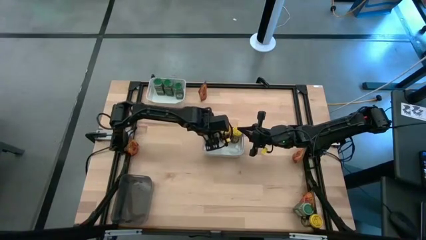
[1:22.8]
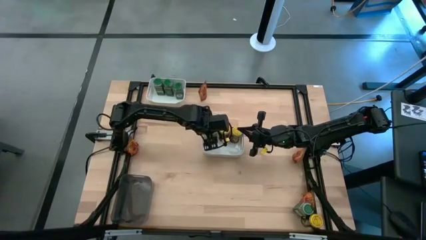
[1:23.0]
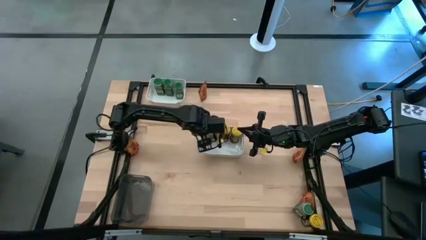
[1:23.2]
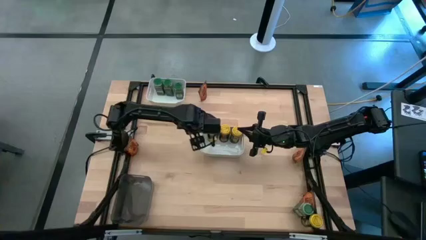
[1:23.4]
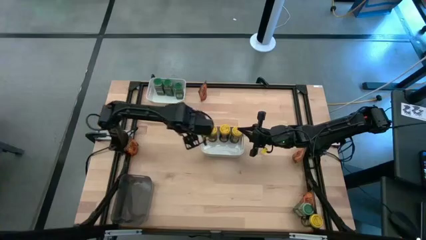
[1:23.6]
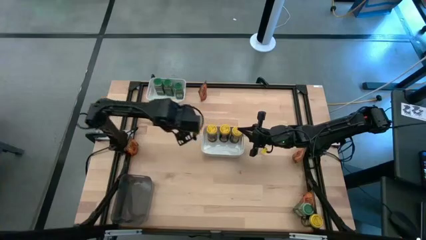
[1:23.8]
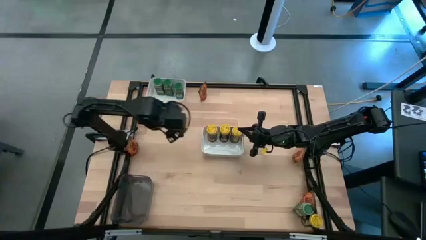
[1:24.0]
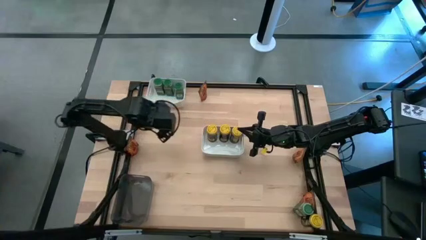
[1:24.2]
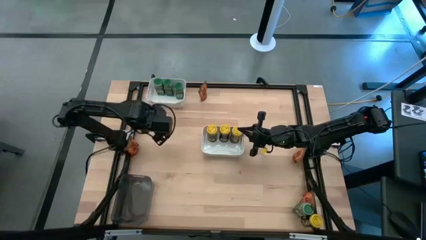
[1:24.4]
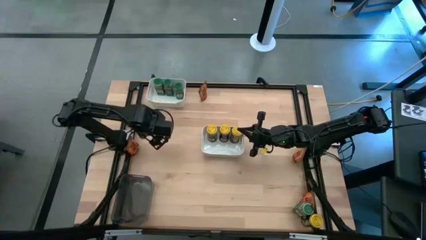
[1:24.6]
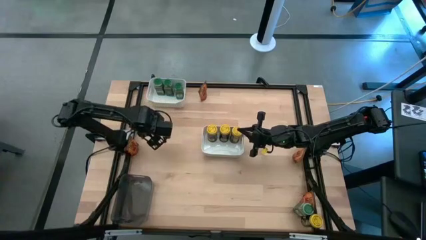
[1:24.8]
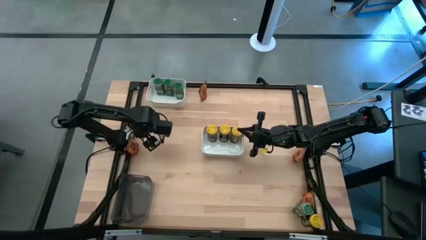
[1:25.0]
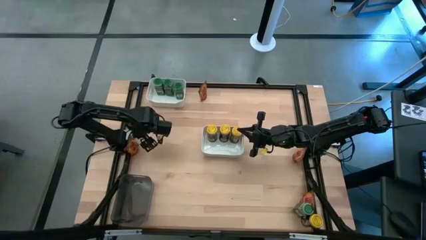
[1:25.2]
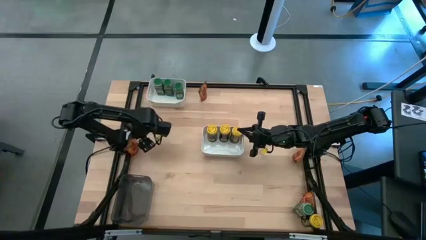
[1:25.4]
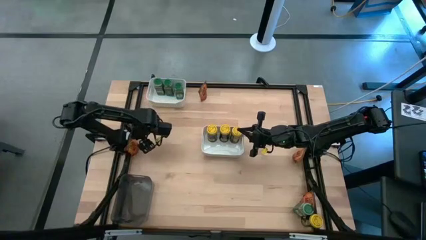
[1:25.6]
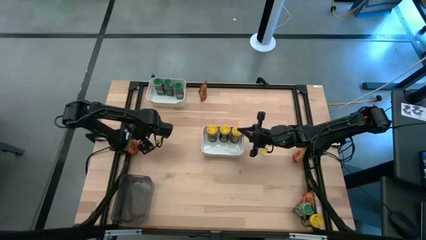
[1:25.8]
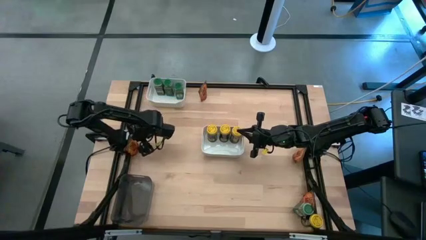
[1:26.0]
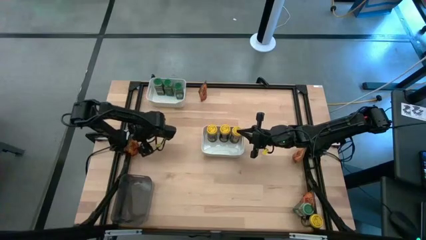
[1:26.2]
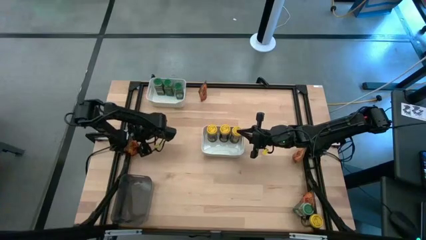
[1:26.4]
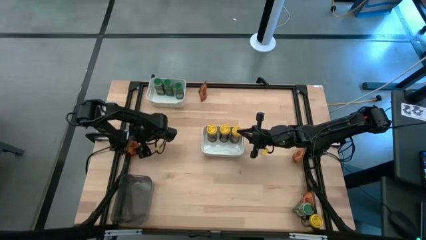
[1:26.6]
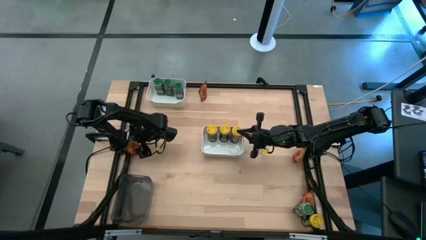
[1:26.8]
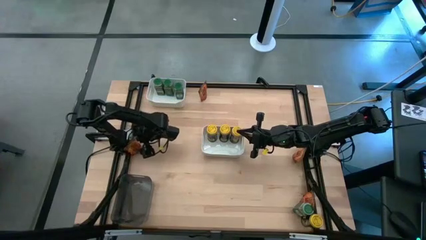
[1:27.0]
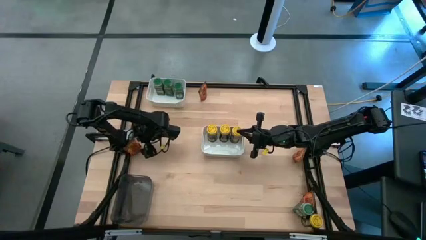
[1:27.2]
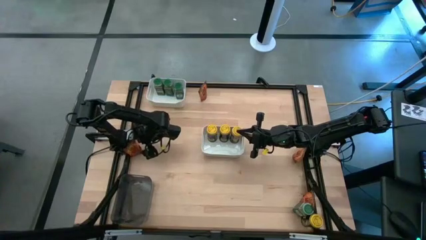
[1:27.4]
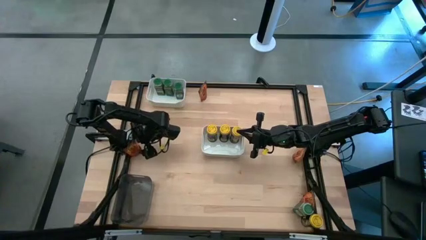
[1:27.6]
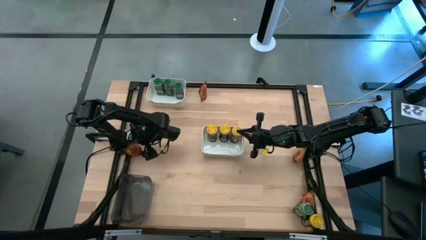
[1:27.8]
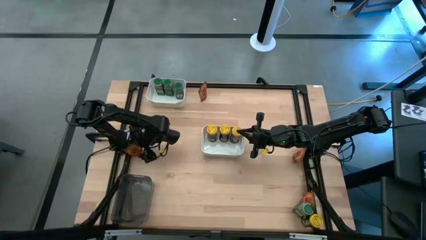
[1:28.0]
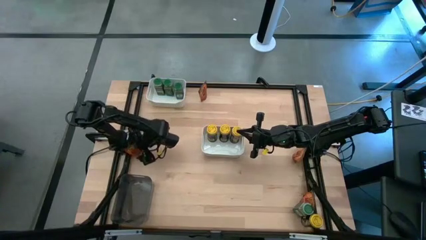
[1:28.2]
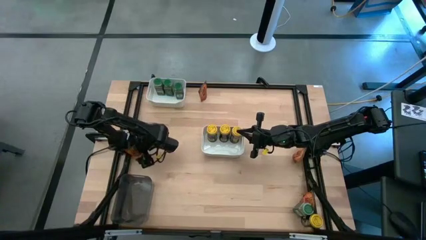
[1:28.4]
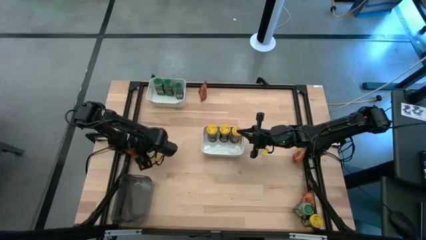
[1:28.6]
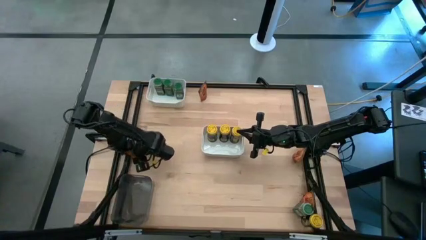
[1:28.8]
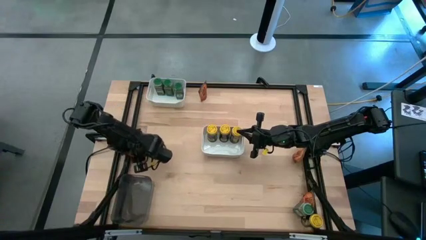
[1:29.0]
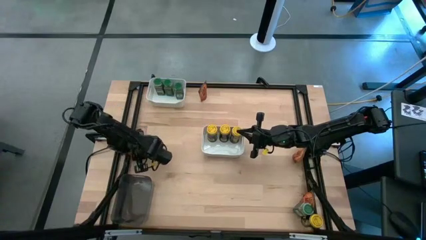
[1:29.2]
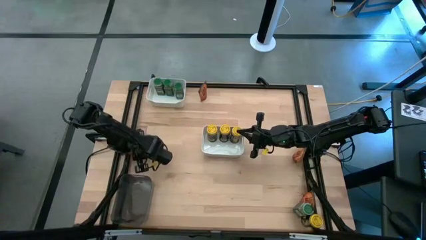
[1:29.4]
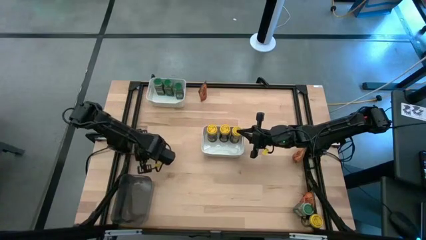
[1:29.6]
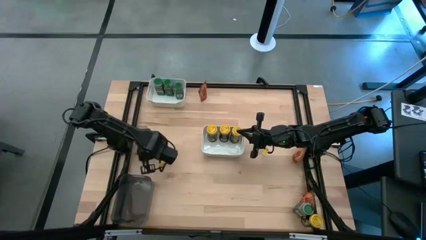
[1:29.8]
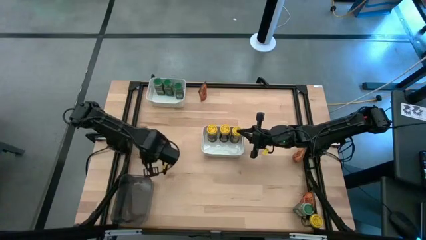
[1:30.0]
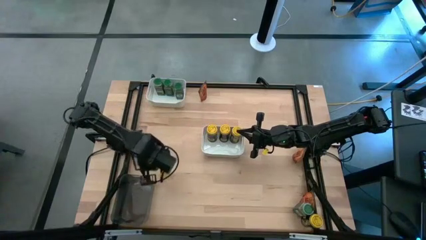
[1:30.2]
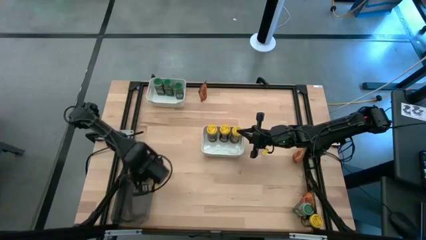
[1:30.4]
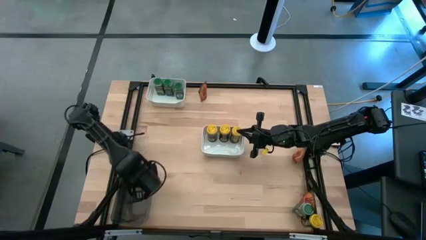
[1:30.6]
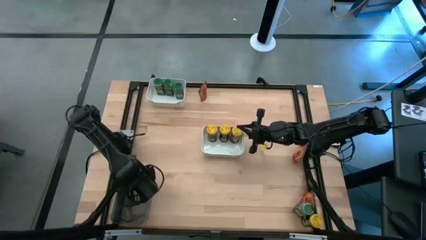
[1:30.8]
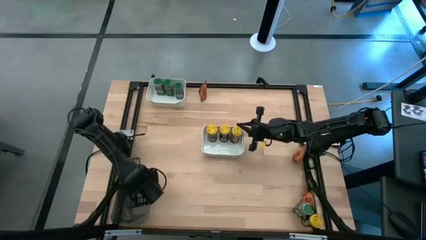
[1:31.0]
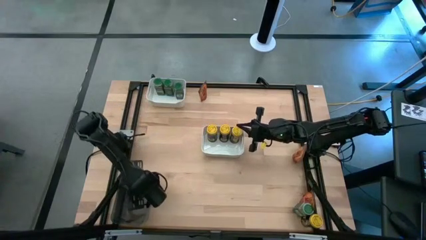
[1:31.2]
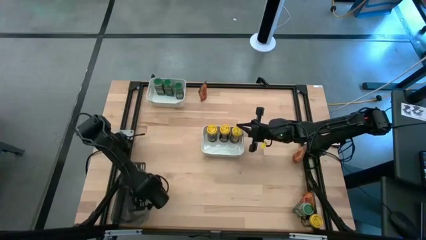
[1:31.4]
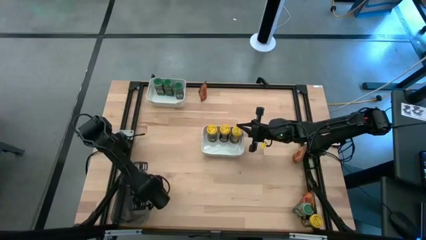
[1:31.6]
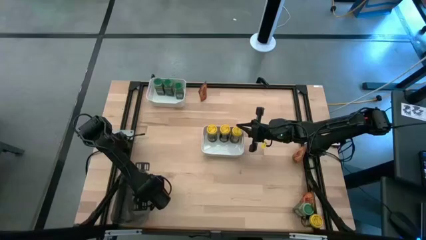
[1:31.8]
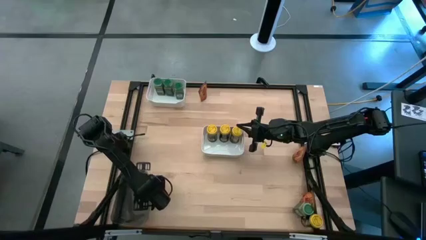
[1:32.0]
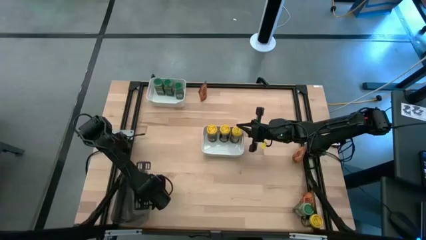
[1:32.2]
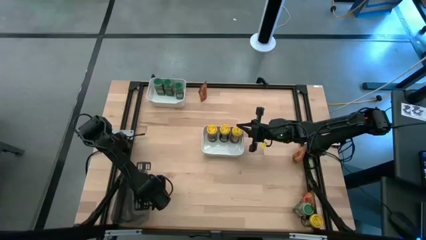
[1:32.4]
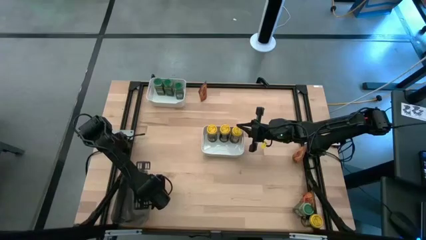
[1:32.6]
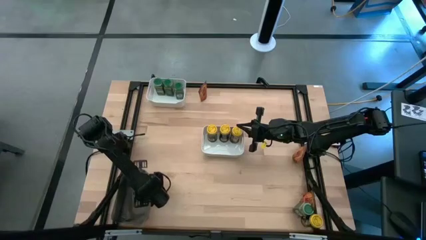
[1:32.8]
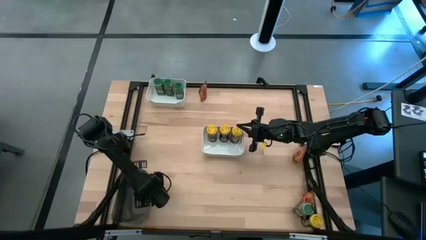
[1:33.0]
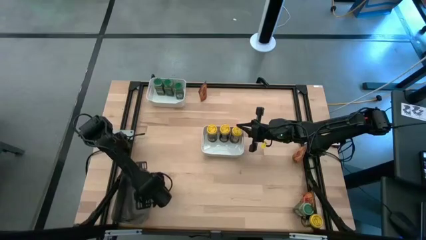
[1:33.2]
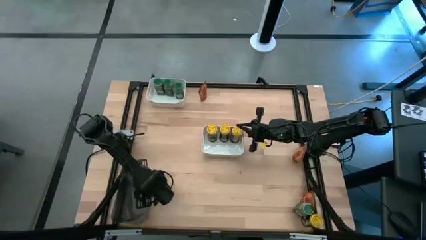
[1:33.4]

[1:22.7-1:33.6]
Task: Sort spices by type
Put the orange seasoning pack into the black bin

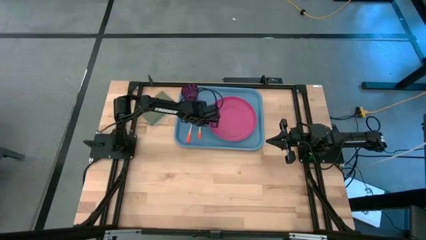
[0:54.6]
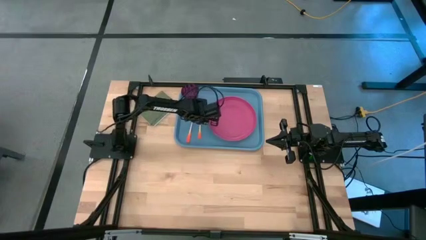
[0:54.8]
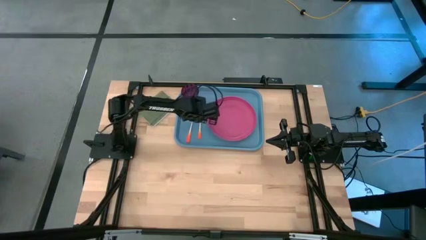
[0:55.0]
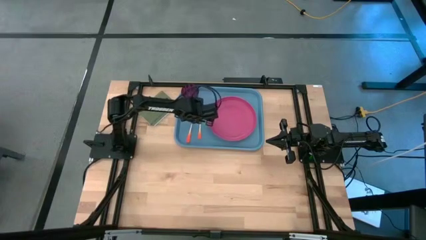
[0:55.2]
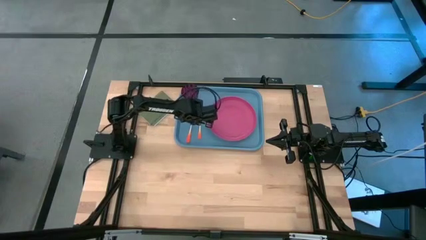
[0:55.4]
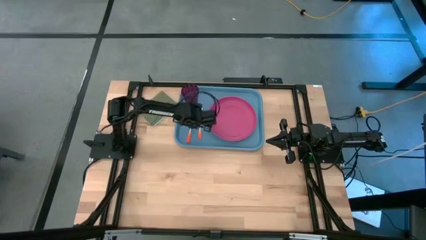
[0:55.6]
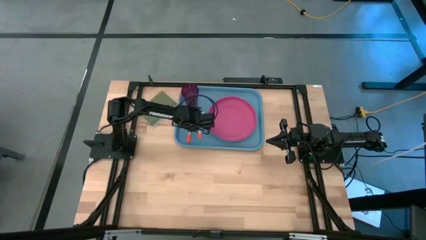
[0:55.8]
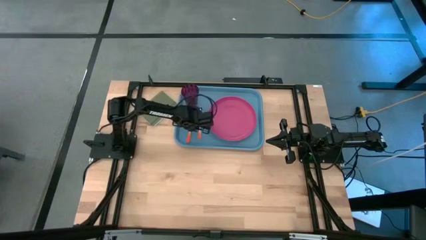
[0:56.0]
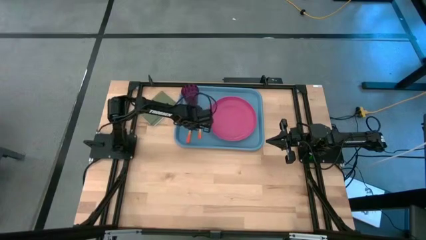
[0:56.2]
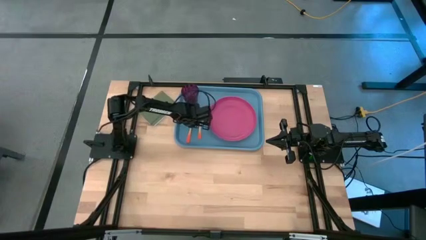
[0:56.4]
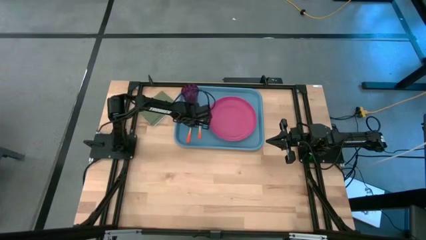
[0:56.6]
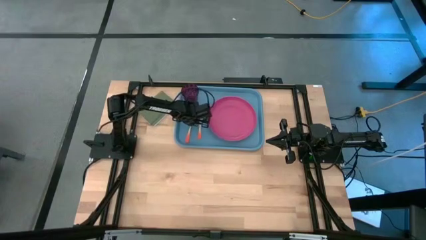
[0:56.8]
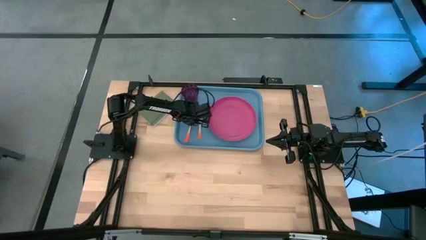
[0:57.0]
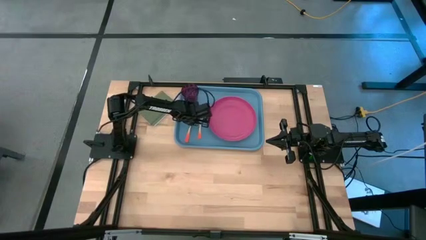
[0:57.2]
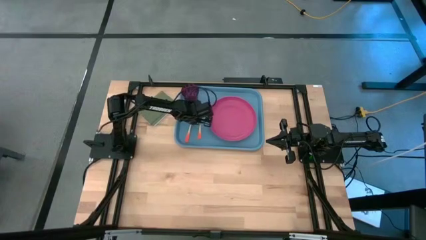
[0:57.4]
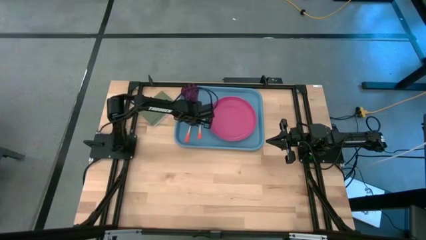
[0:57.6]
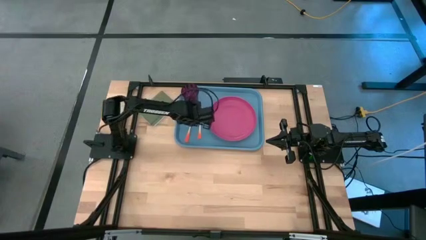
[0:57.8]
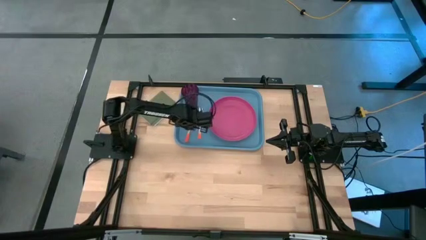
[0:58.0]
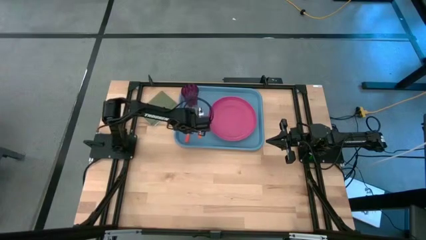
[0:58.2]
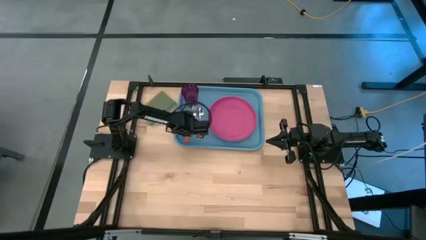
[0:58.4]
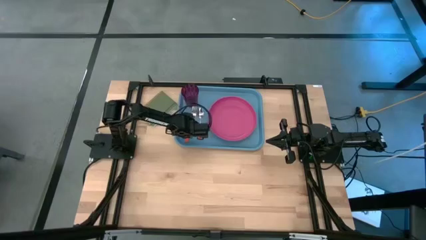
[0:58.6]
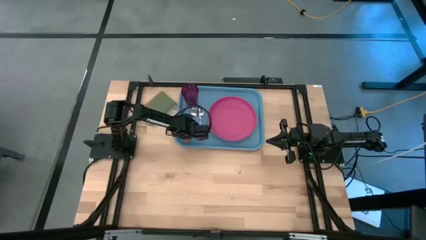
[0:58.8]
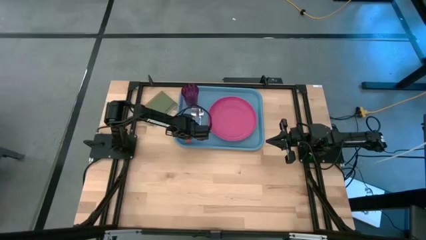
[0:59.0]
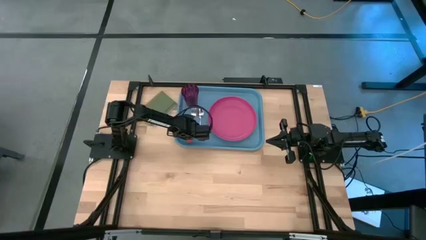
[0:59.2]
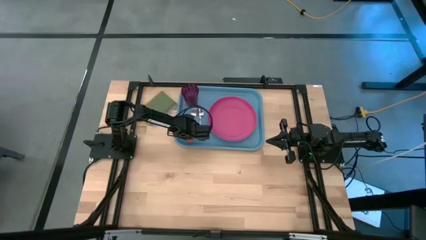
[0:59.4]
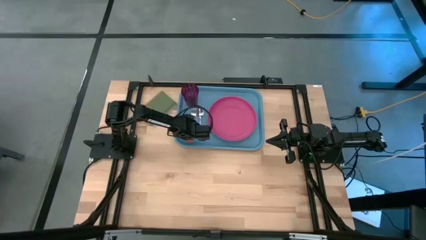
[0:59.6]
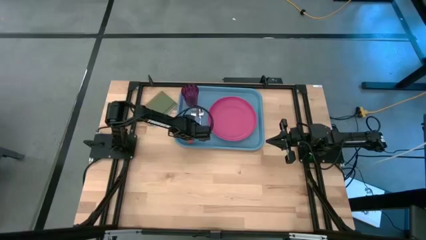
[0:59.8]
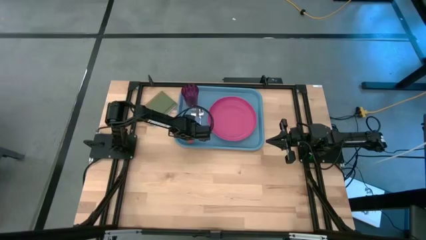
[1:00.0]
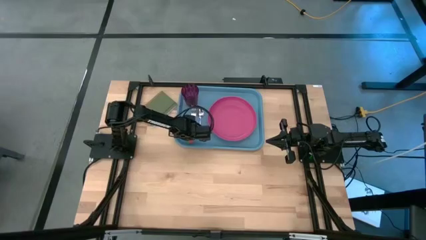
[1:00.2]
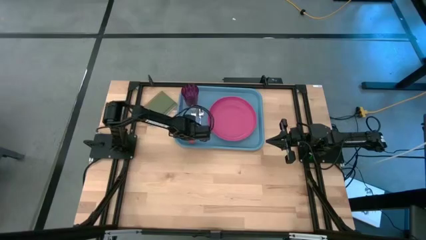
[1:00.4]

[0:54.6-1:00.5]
Task: Pick and place plate/cup/fork/spoon on tray
Adjust the orange fork on the blue tray
